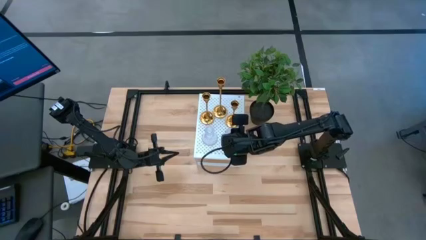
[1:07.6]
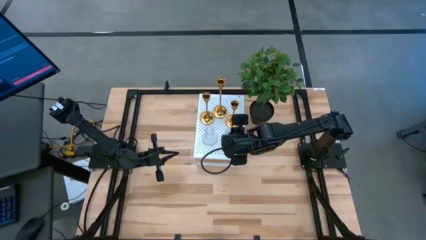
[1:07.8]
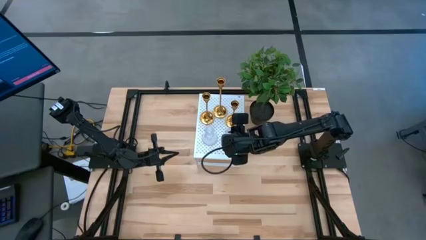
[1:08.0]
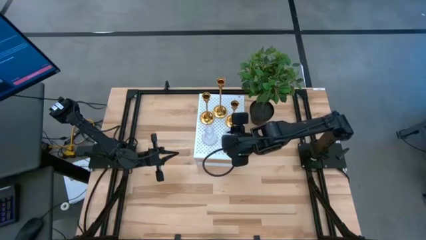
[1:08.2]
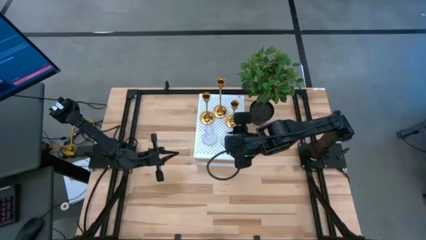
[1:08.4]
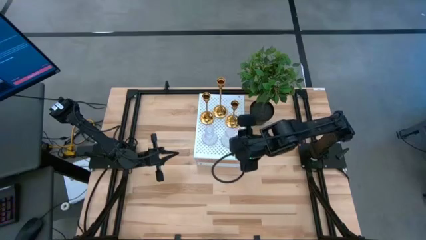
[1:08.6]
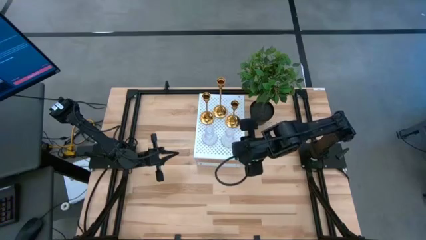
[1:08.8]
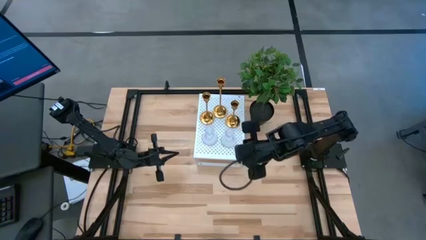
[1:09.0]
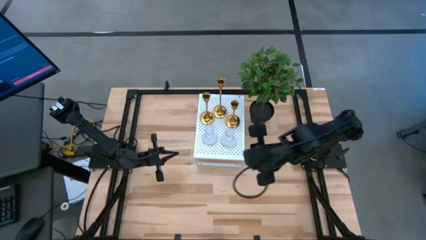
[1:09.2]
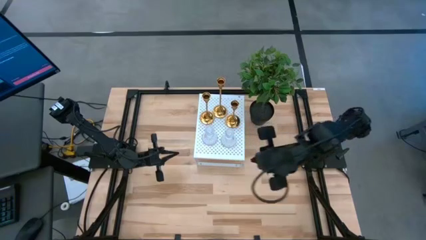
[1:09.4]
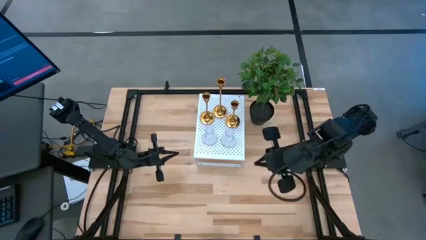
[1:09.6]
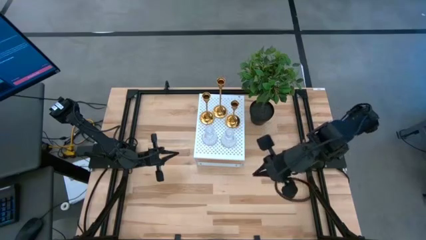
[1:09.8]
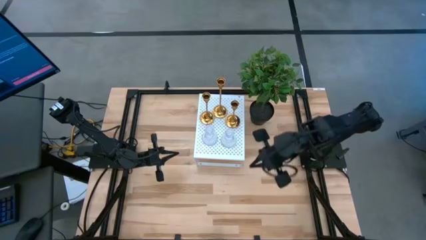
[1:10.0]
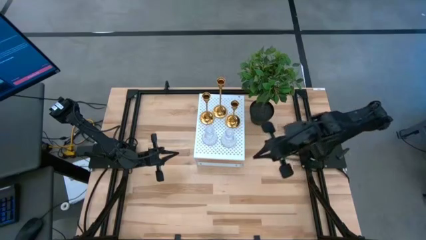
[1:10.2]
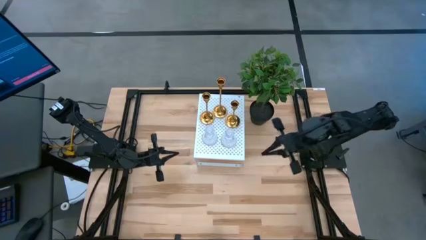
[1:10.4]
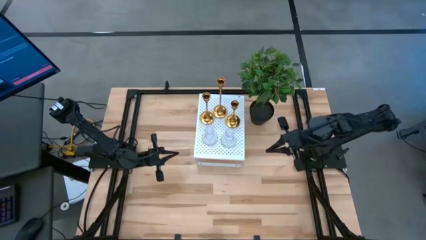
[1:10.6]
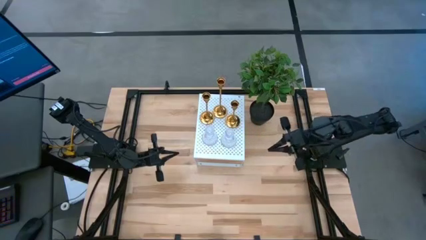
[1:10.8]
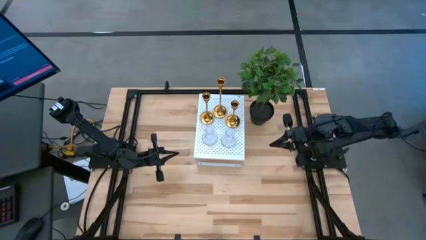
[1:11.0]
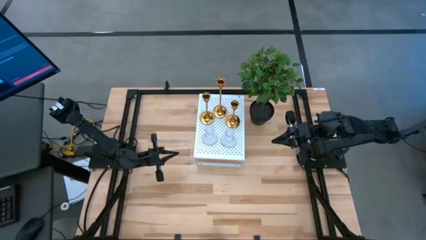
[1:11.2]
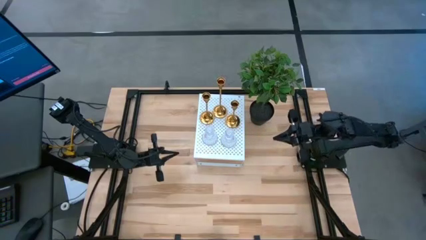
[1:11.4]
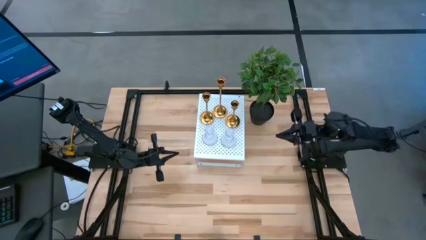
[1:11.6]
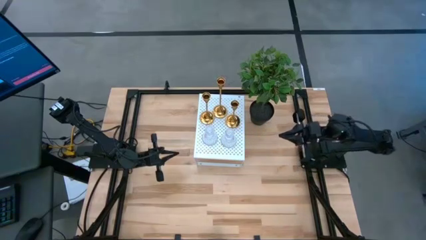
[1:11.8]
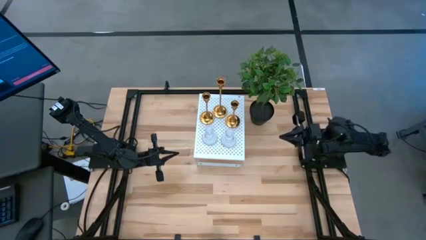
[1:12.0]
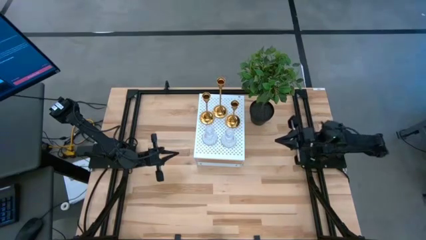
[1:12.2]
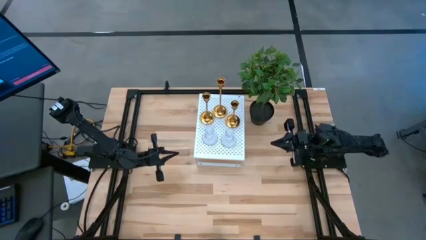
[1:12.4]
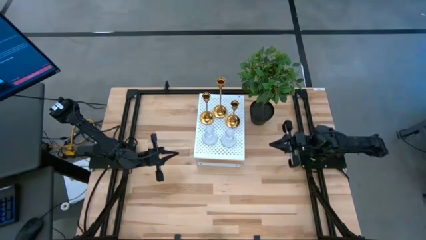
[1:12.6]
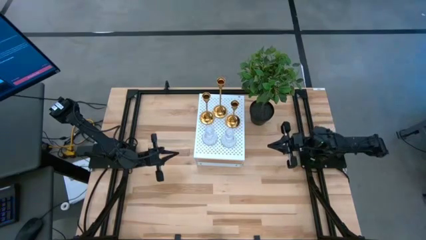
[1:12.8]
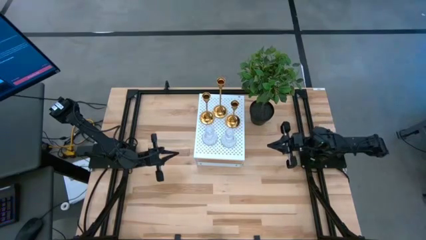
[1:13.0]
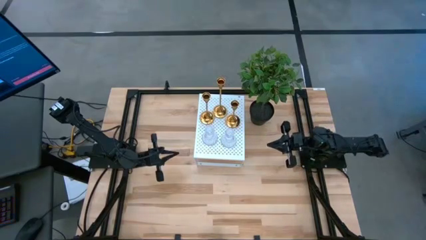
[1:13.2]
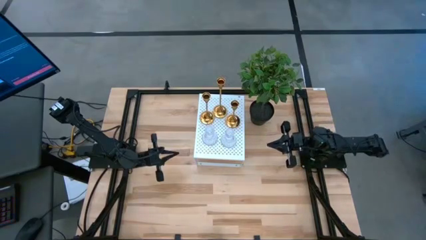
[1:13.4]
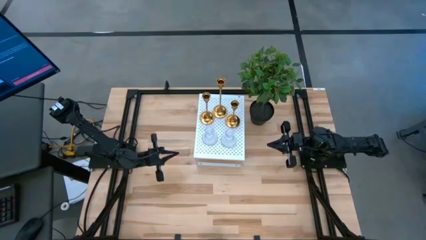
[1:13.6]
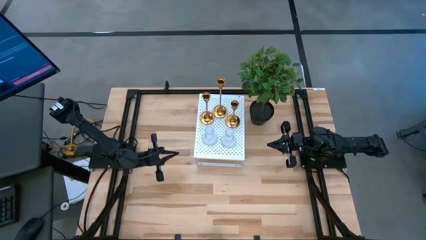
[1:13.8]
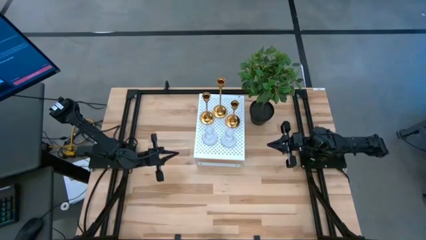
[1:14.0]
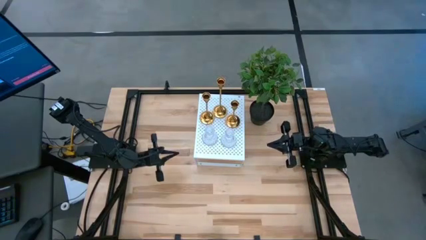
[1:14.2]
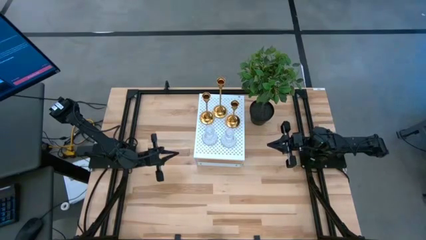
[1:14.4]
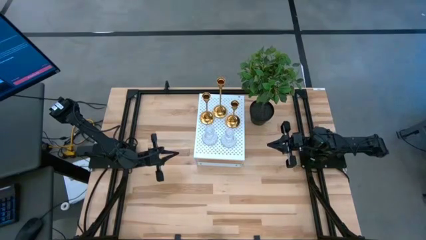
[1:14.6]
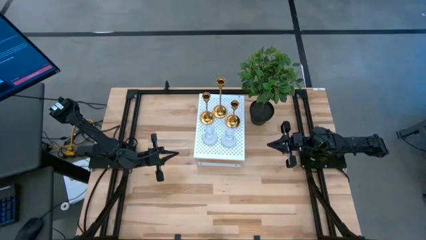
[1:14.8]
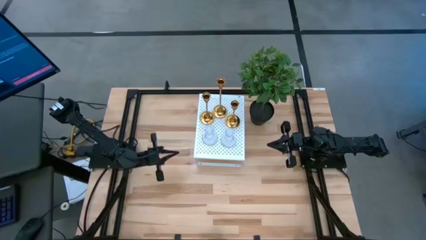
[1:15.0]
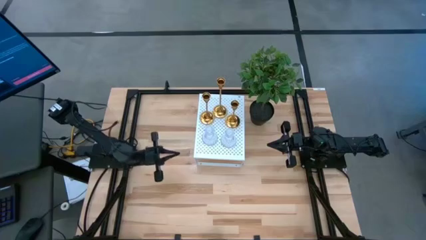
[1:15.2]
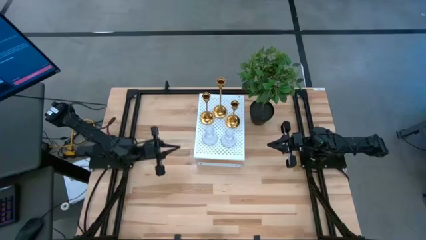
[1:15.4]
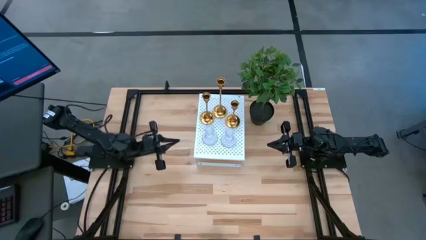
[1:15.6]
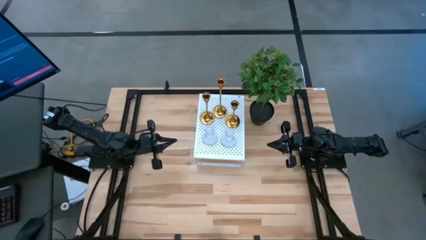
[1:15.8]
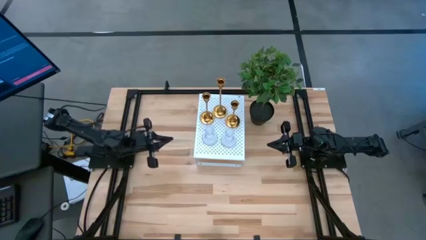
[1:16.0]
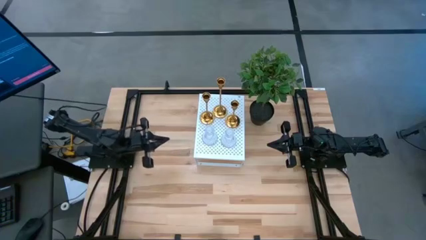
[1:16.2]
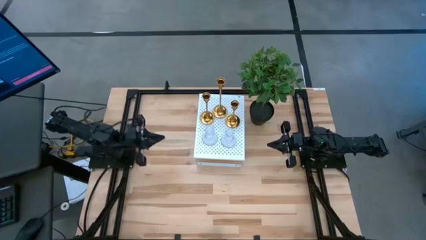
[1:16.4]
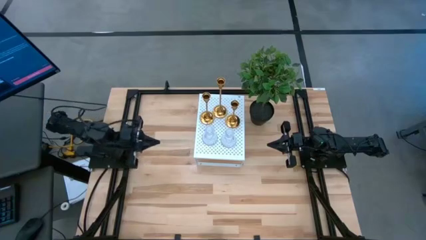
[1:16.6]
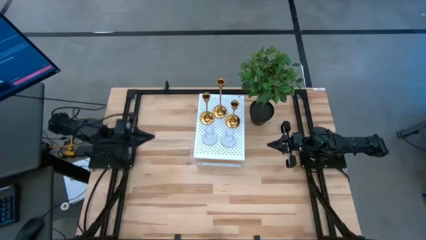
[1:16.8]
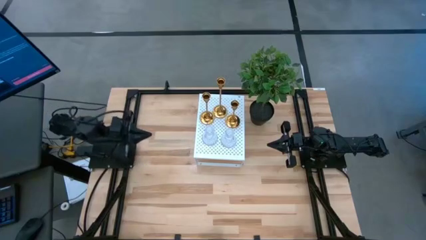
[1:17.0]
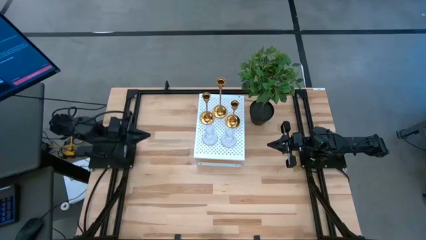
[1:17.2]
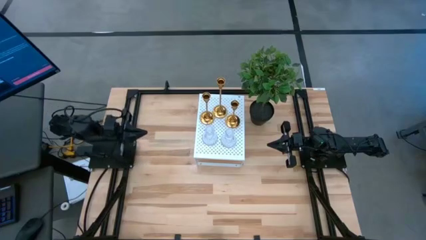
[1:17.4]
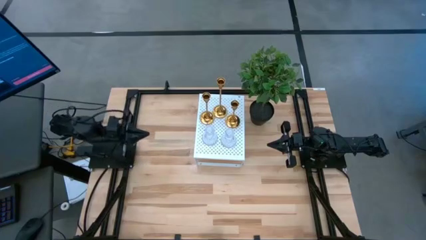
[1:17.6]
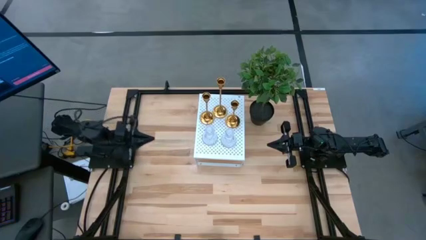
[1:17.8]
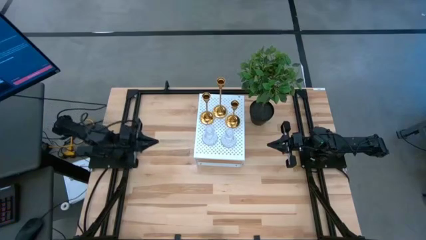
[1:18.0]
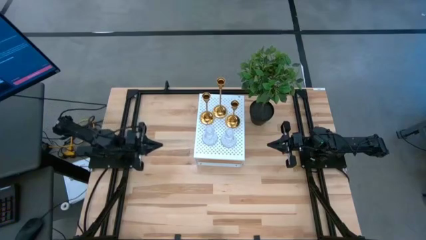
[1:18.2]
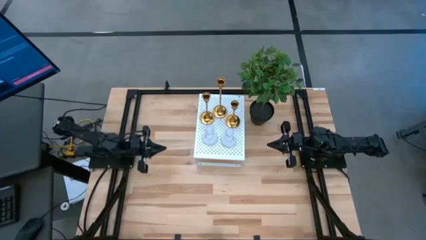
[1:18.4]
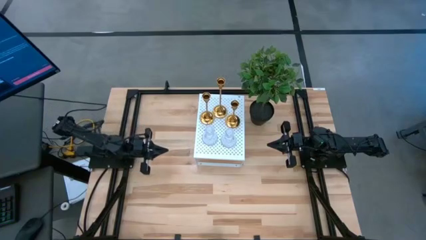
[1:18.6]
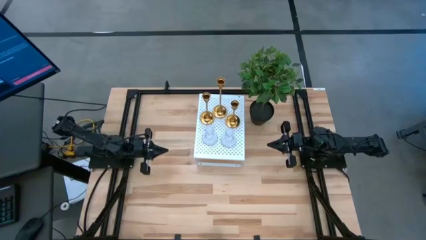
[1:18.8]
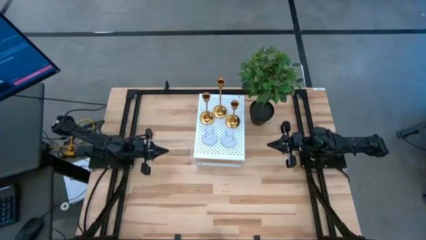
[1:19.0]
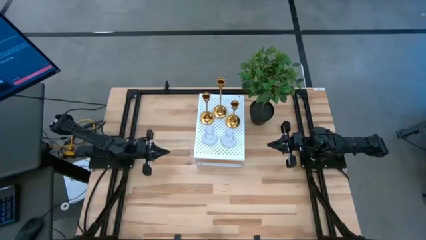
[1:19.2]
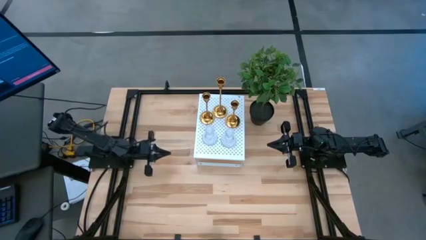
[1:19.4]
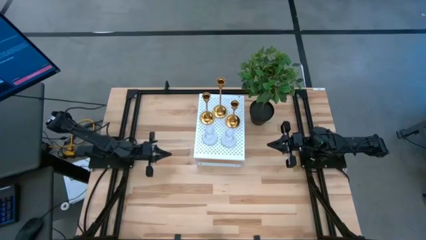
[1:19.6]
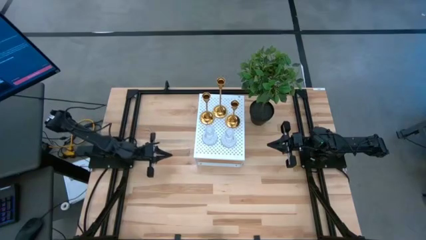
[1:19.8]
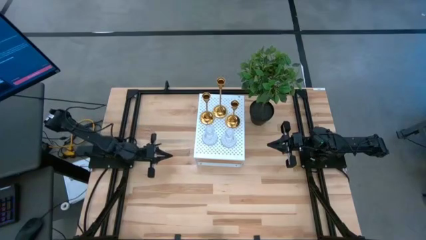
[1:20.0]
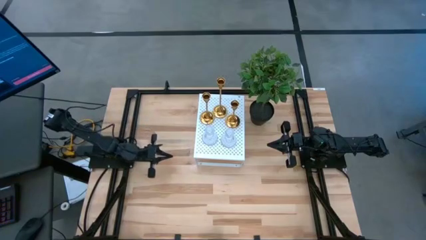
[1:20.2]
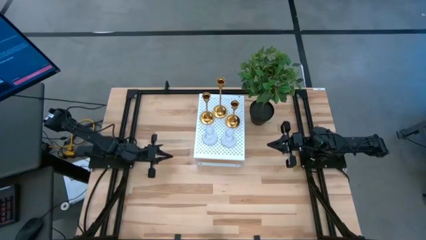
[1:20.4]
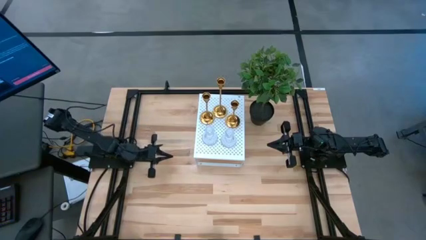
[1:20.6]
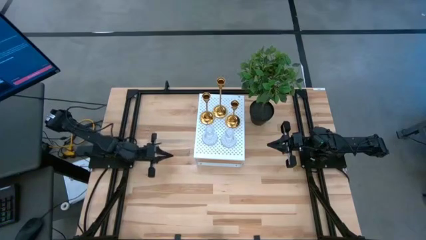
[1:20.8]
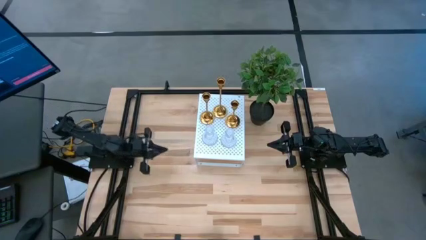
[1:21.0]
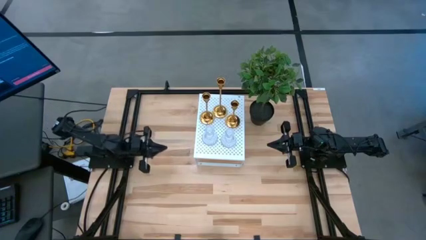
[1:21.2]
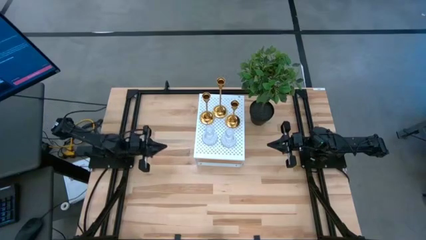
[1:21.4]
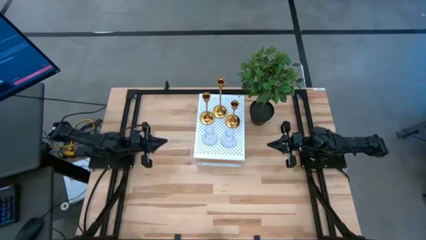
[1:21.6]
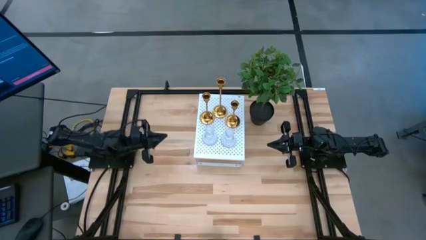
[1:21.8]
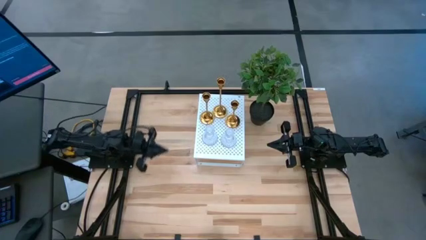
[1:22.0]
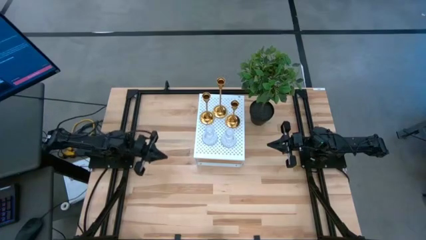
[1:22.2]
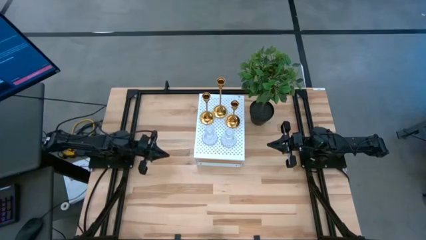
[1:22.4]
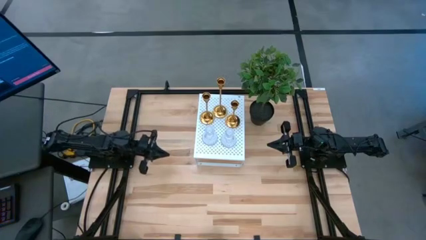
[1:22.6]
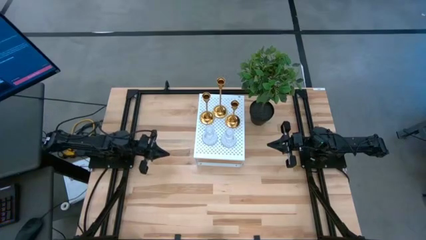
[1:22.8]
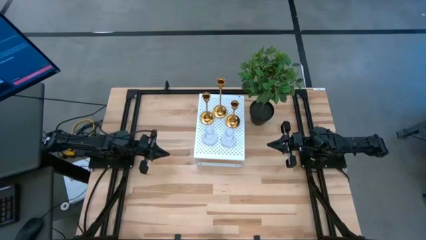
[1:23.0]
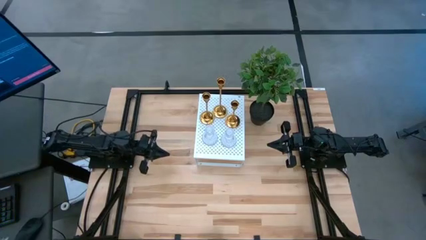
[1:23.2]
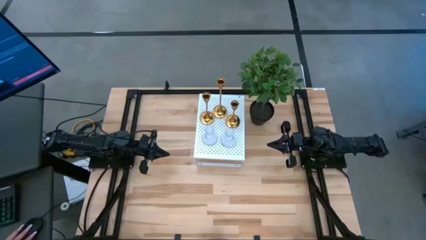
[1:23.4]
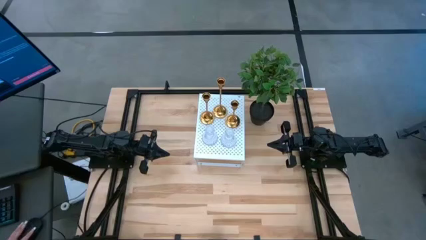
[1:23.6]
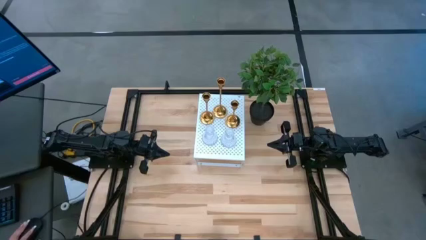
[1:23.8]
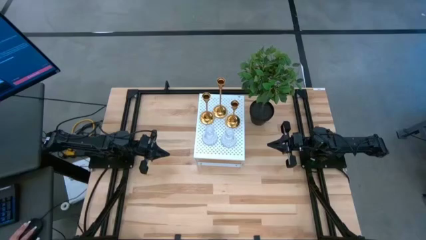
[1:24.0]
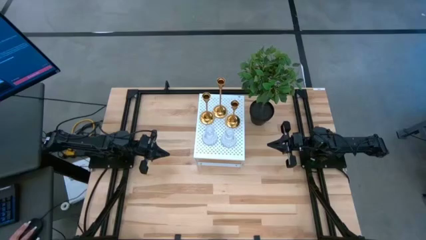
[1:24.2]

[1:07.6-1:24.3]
Task: Pick & Place candle stick holders
Return to Home Position
